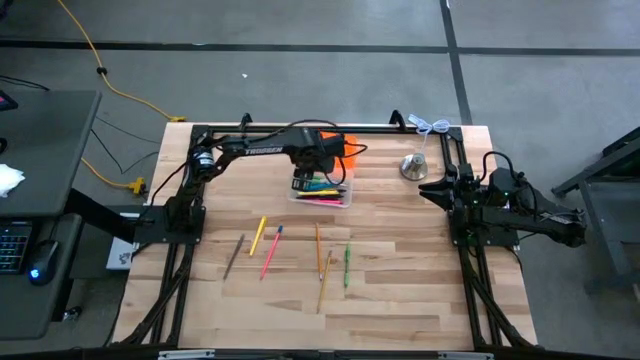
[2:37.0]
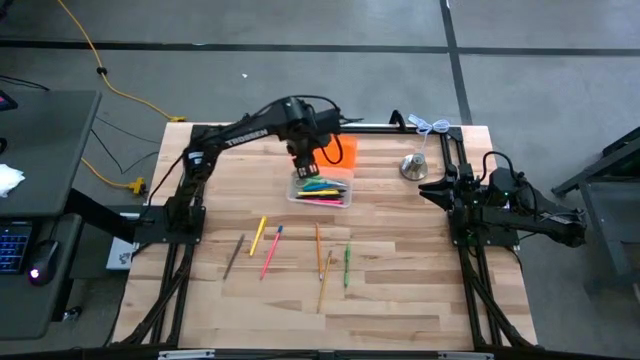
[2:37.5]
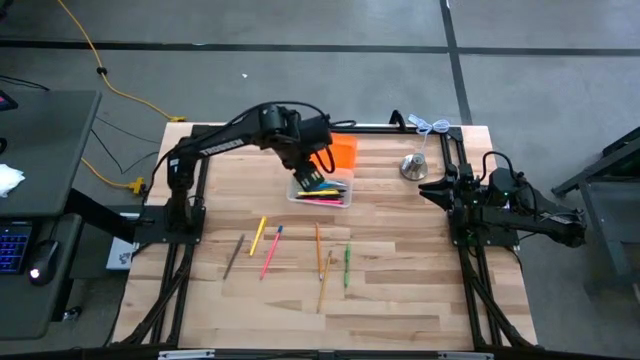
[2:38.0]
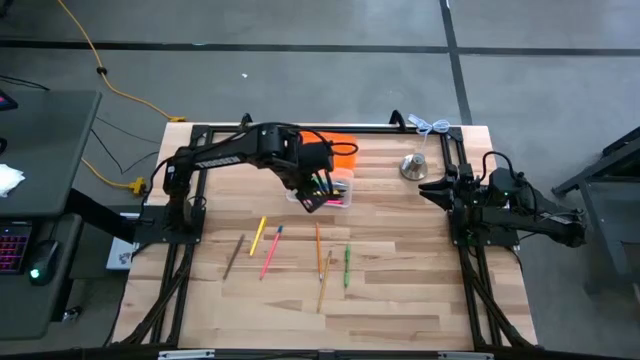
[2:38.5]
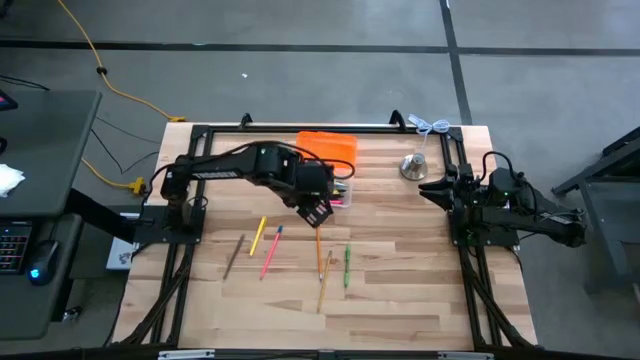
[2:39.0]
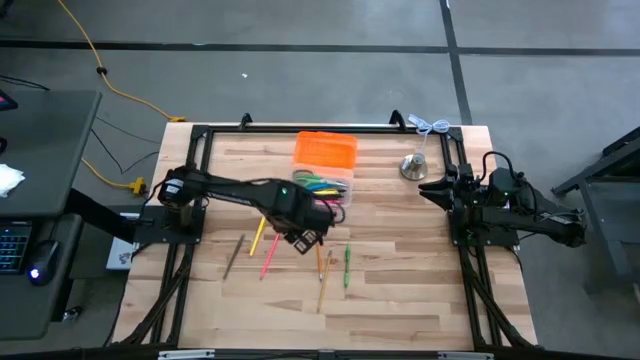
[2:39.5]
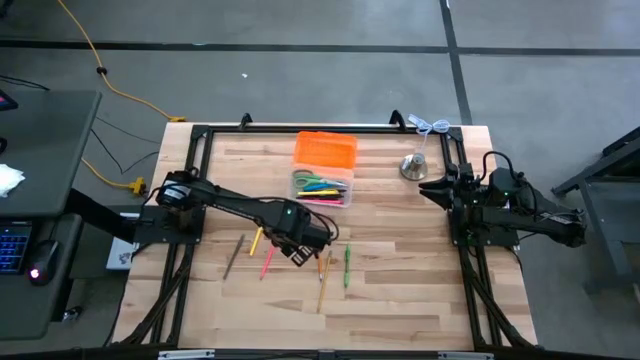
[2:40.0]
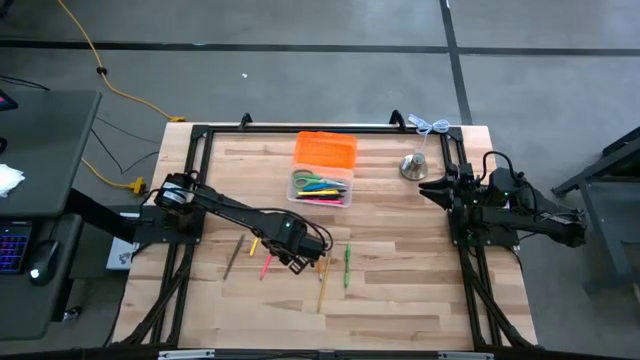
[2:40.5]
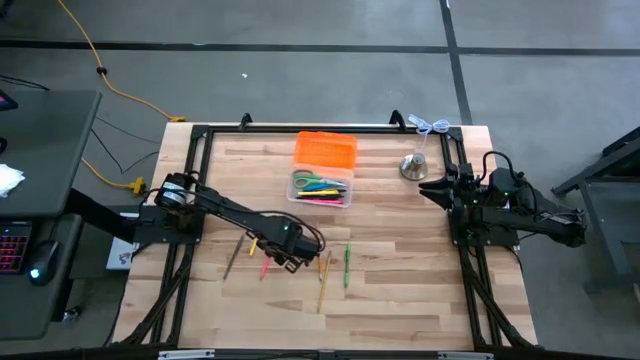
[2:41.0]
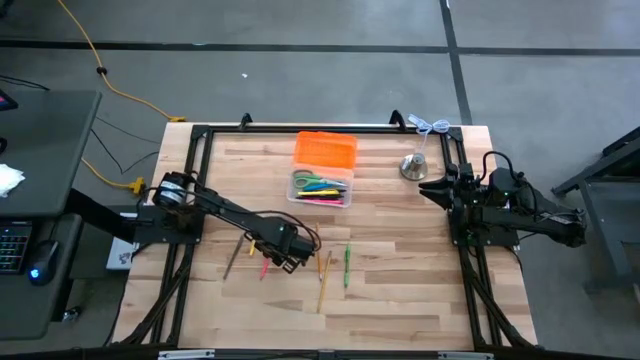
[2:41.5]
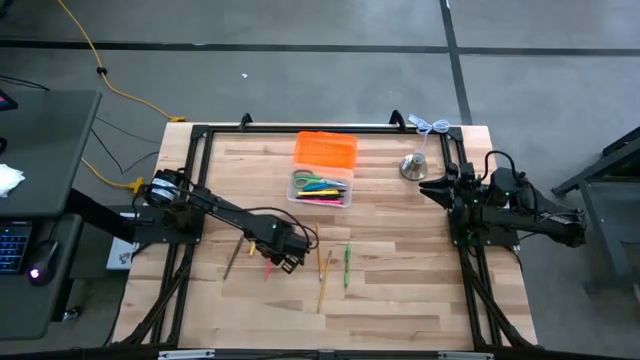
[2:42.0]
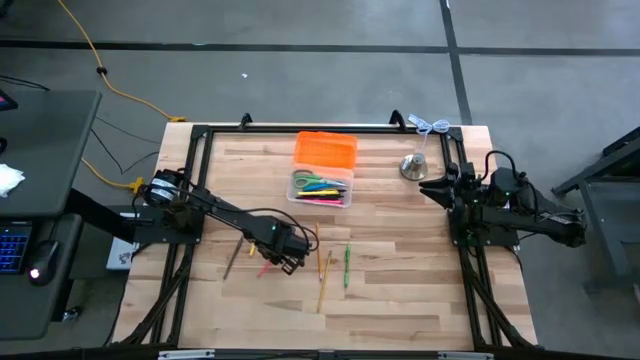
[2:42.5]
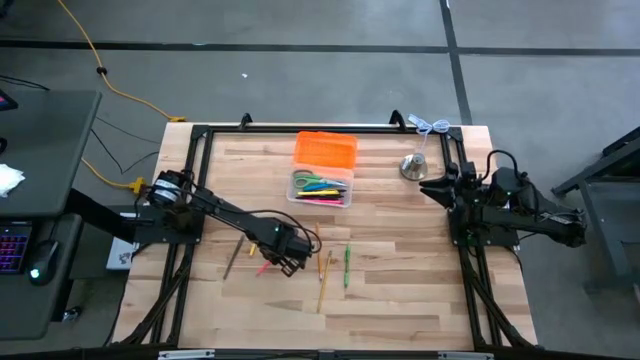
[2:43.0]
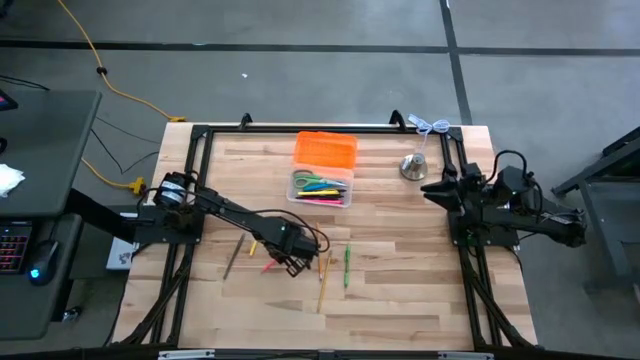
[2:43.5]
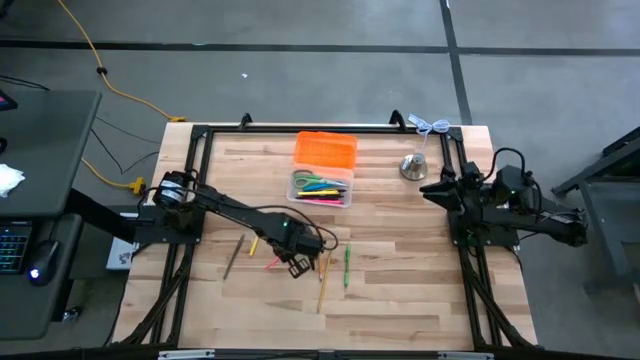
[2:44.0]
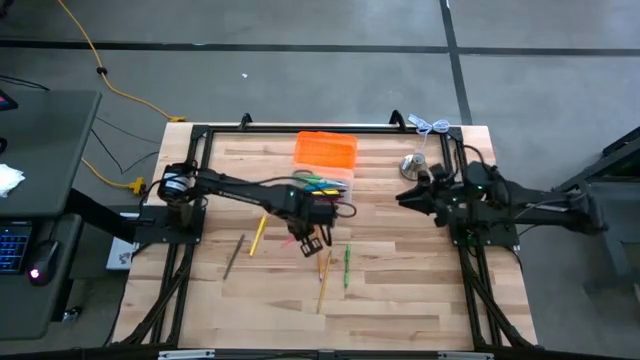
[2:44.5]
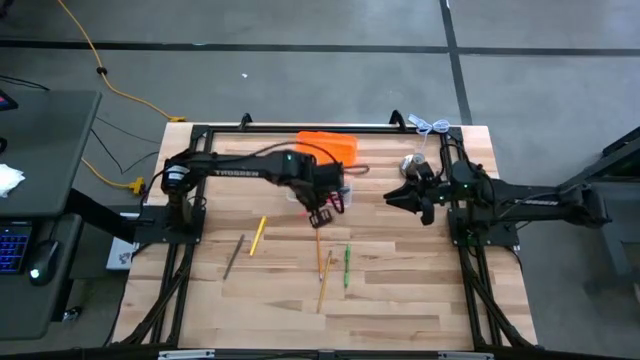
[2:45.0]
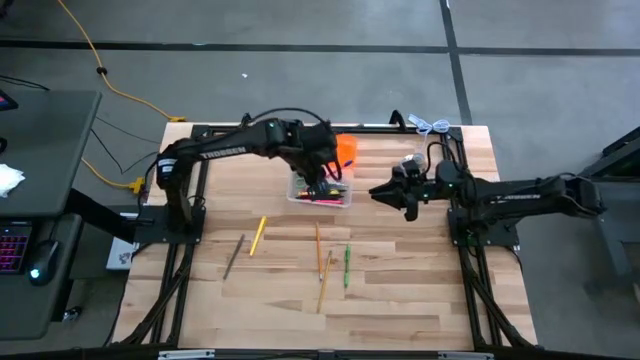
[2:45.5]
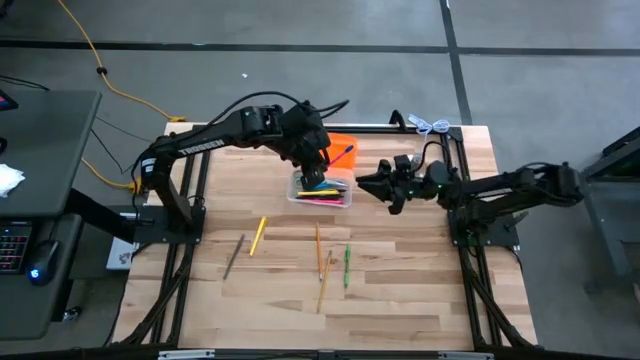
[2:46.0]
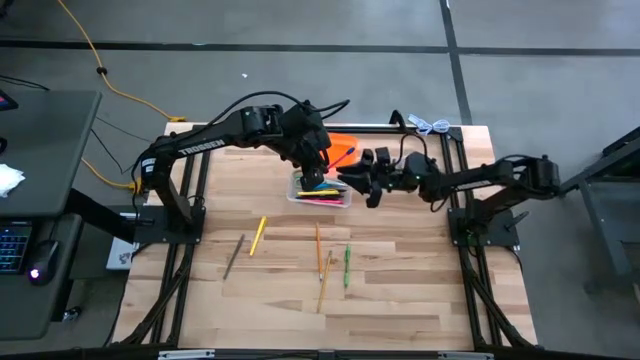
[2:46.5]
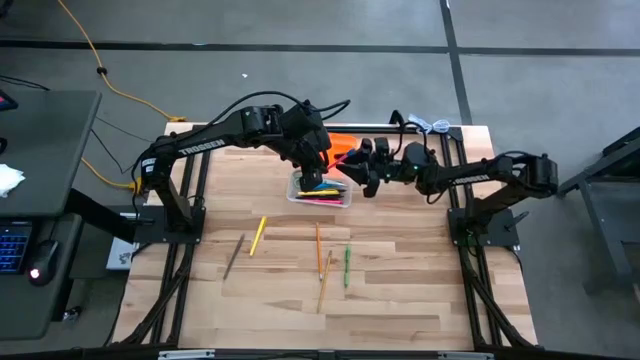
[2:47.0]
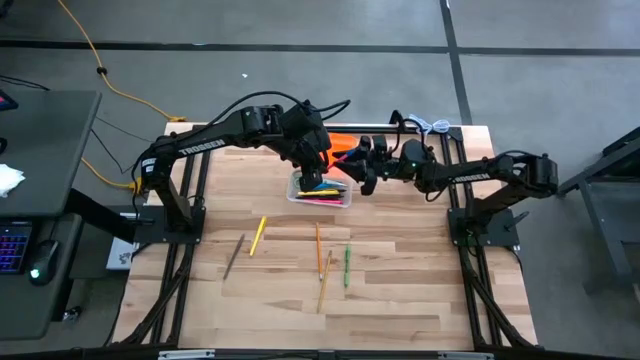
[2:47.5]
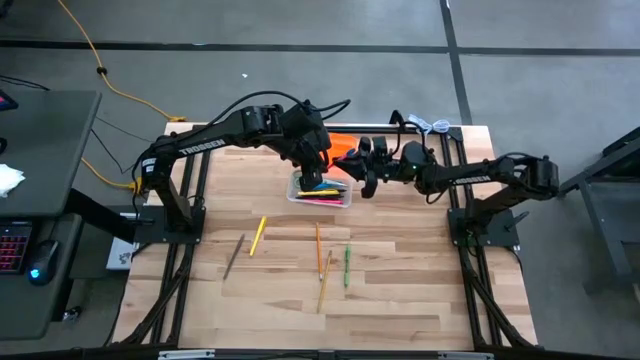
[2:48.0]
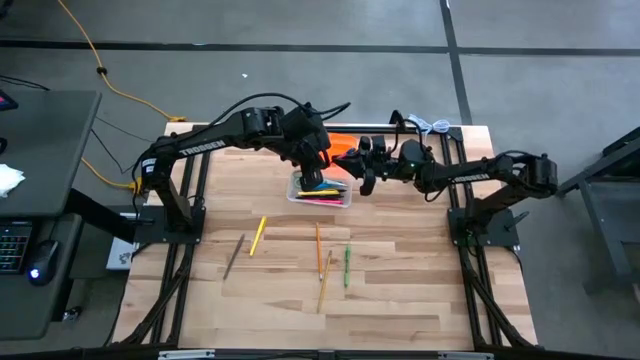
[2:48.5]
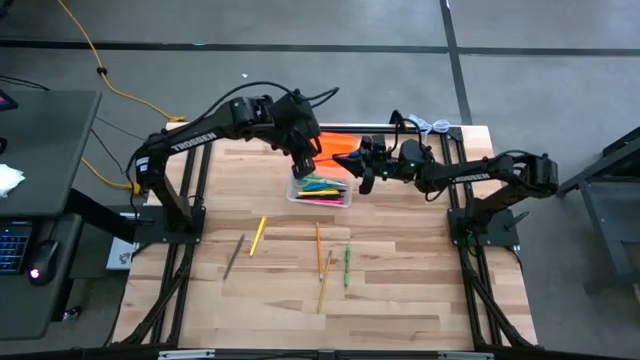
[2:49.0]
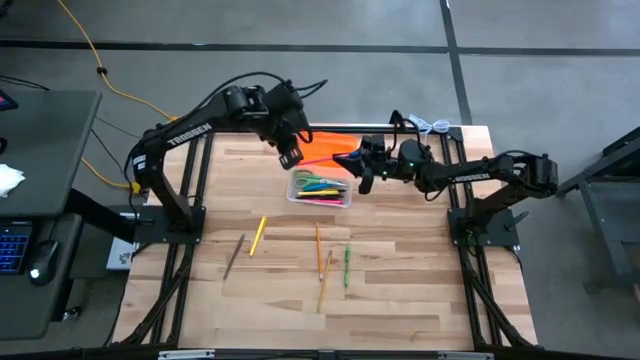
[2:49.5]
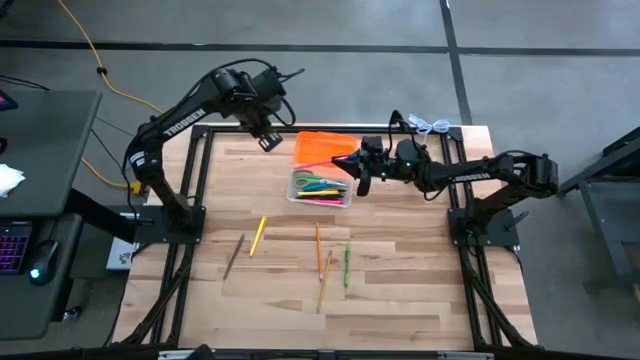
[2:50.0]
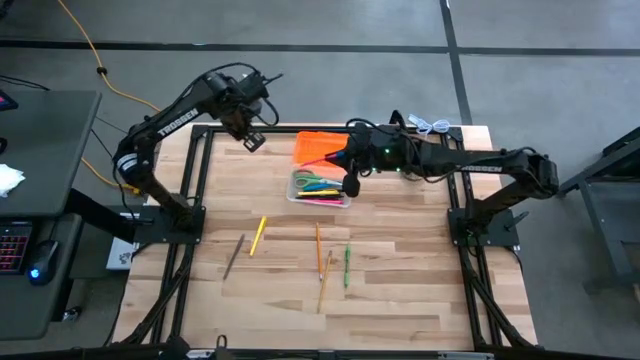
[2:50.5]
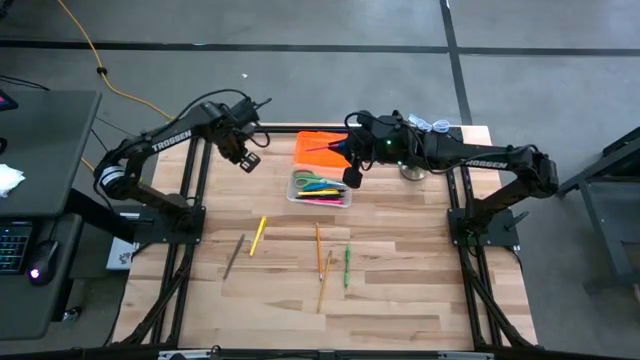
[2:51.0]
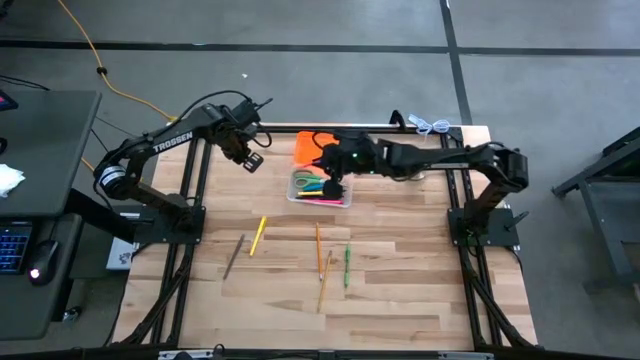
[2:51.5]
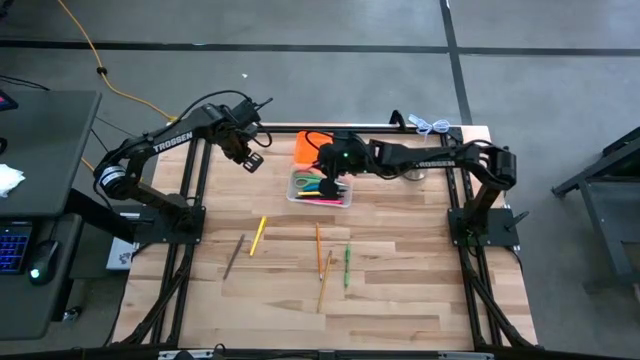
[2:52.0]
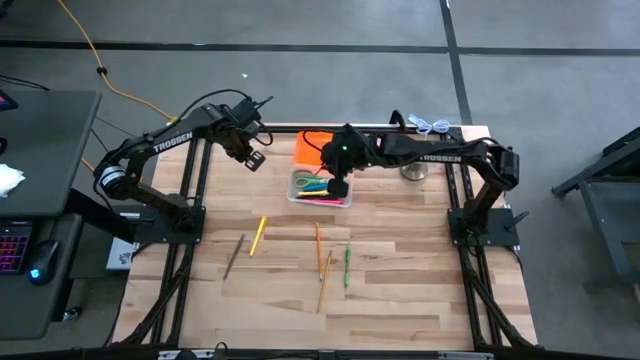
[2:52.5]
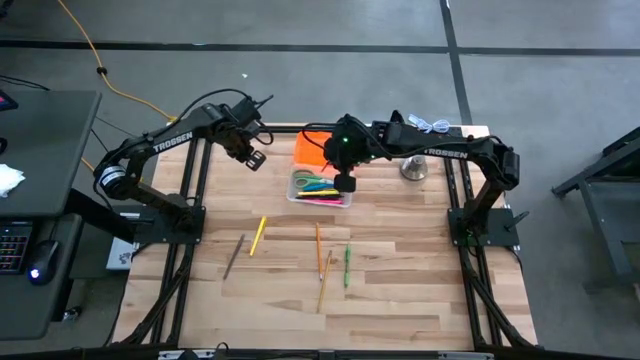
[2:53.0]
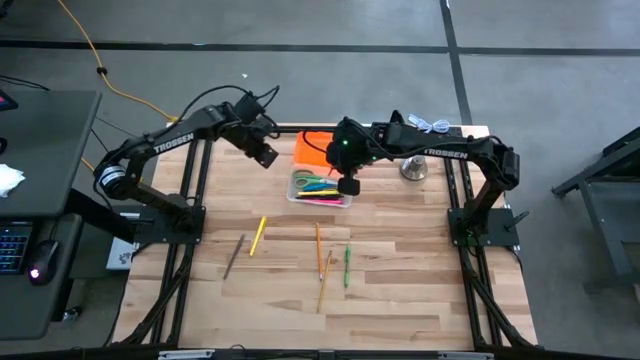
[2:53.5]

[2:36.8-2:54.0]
Task: Pick & place school supplies into a supply box
Put the pink pencil into the transparent supply box

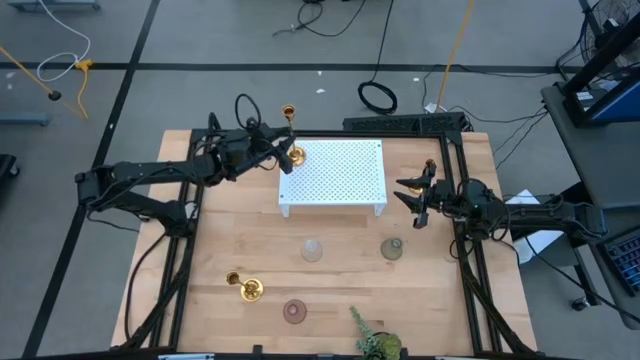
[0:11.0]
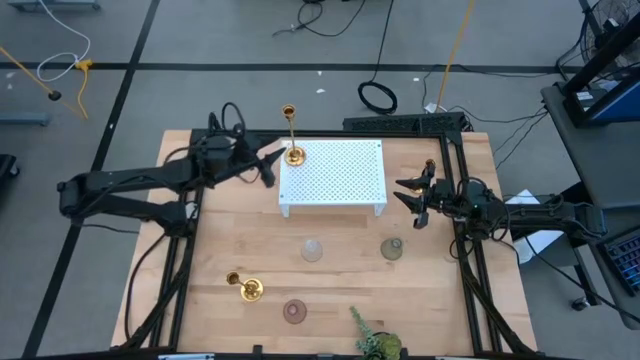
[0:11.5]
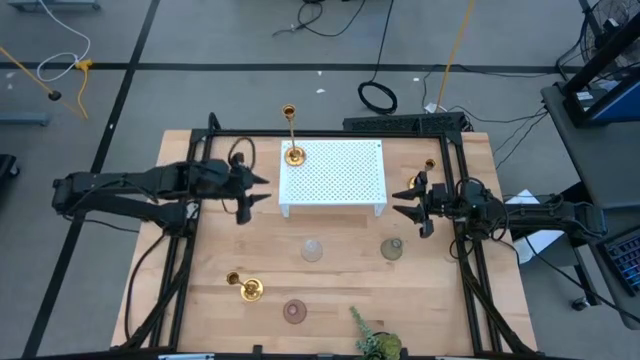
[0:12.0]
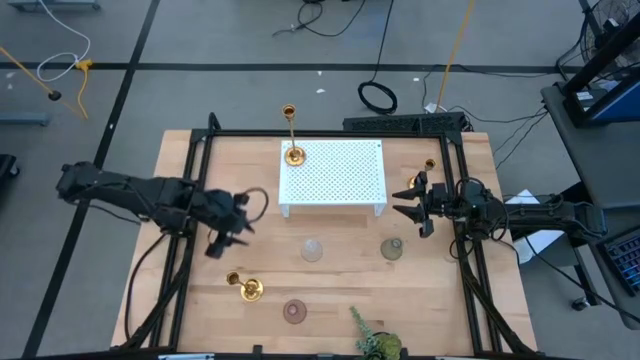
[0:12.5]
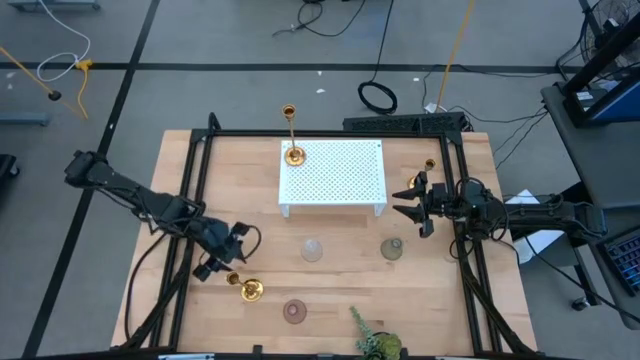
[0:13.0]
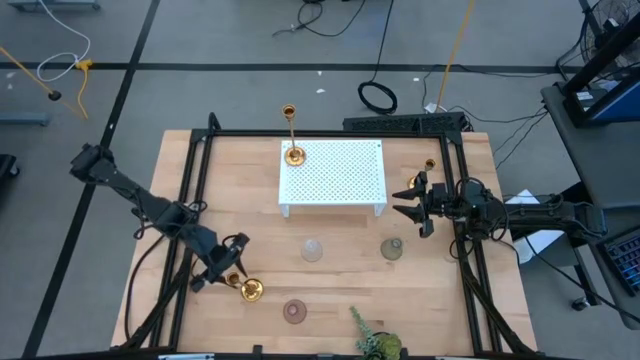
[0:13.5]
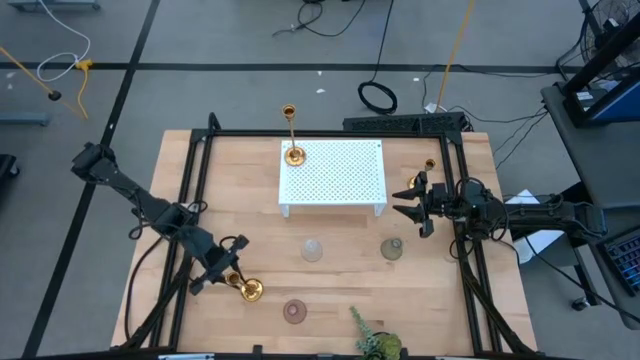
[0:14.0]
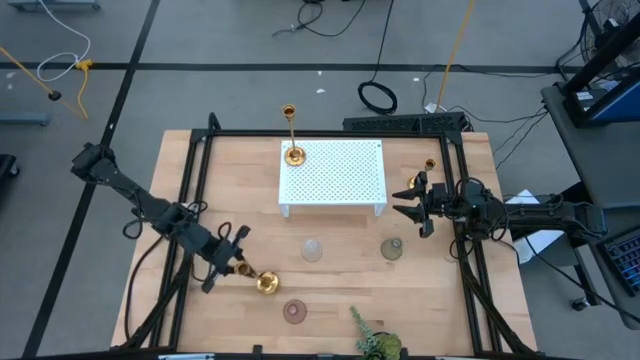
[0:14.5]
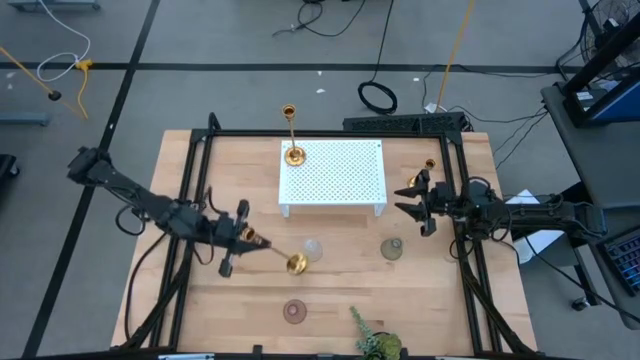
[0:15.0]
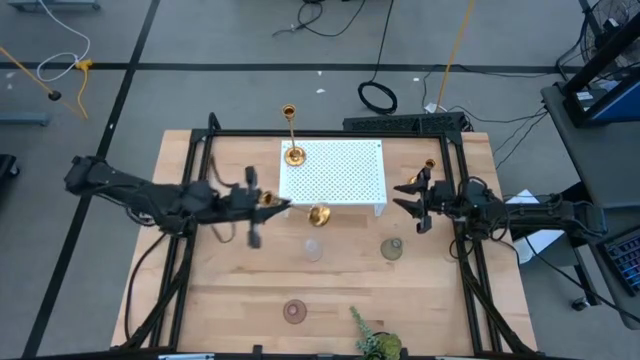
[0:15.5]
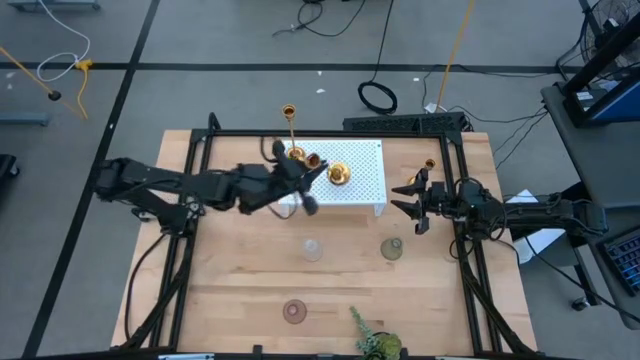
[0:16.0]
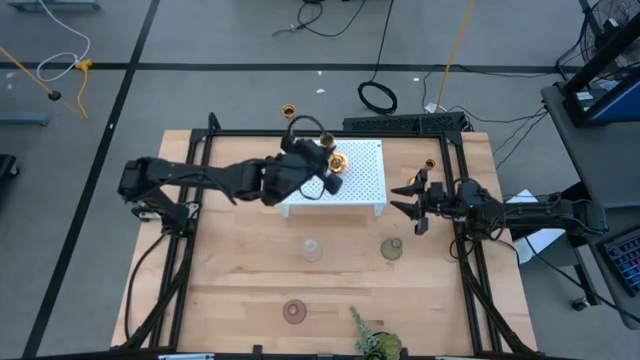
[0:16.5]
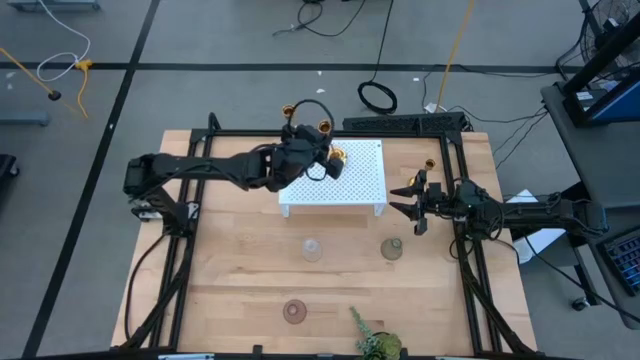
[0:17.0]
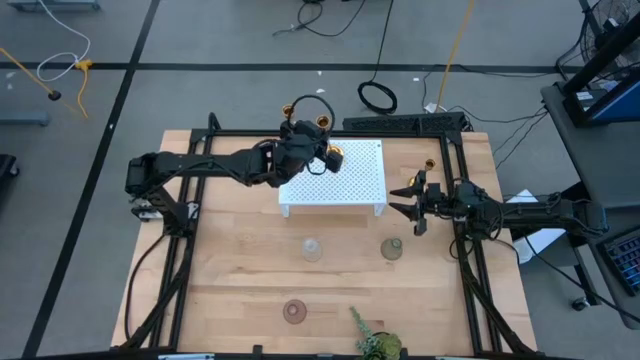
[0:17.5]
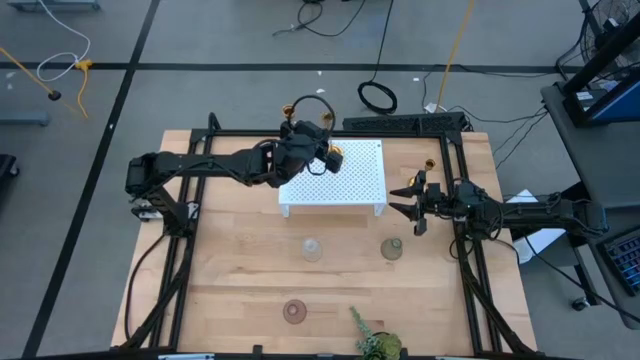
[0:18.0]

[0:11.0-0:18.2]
Task: Pick & Place candle stick holders
Put the bottom gold candle holder on the shelf
